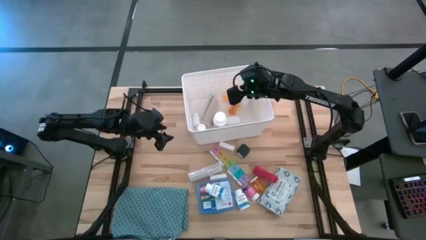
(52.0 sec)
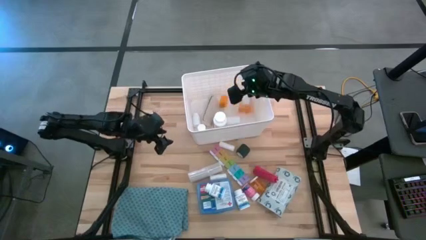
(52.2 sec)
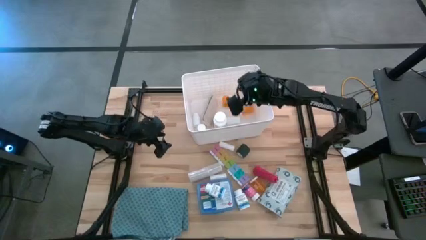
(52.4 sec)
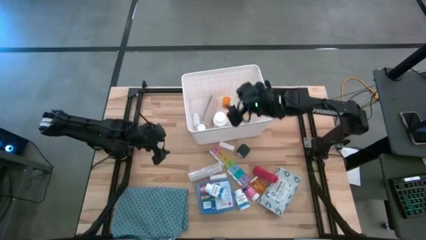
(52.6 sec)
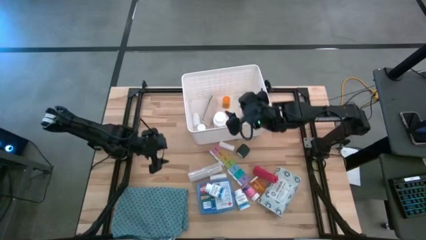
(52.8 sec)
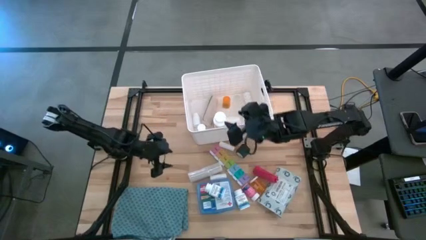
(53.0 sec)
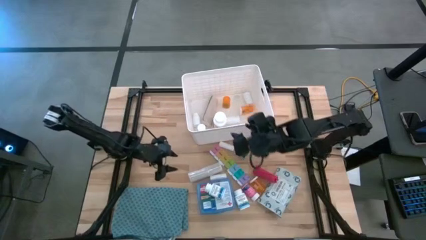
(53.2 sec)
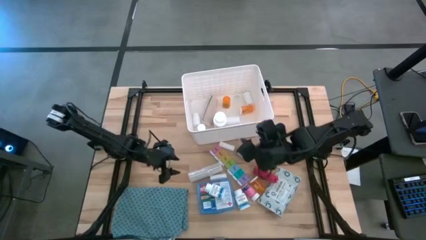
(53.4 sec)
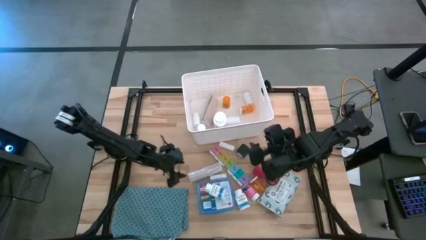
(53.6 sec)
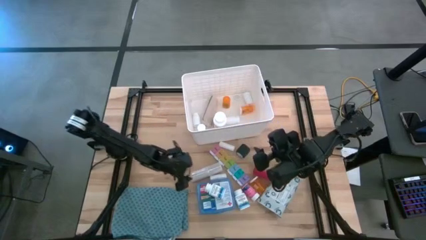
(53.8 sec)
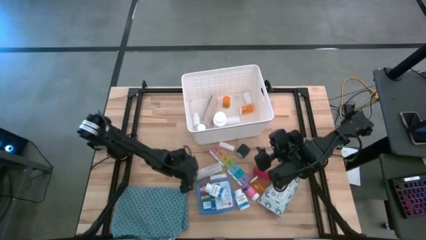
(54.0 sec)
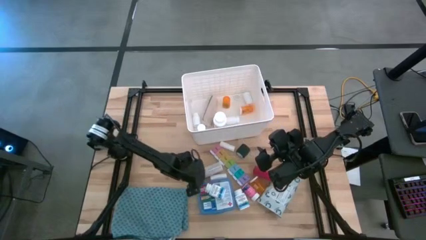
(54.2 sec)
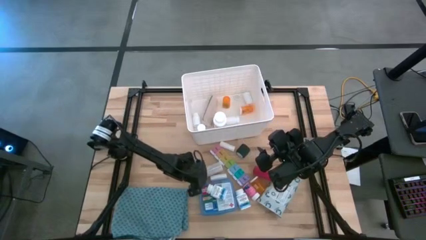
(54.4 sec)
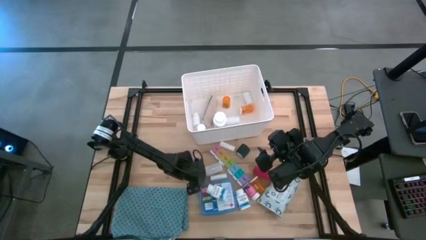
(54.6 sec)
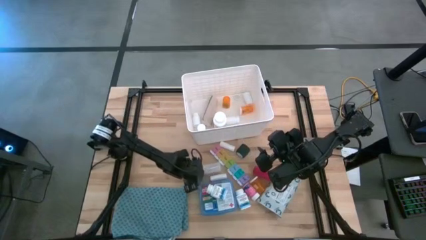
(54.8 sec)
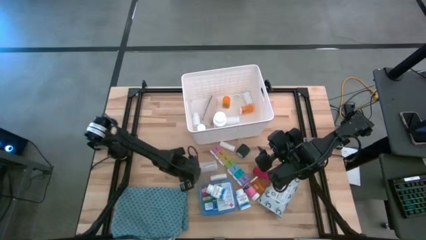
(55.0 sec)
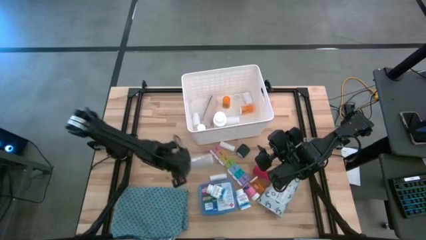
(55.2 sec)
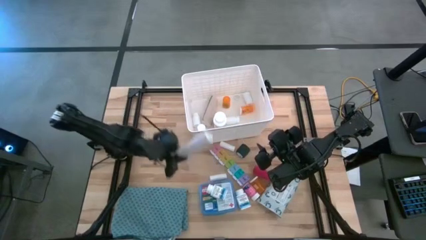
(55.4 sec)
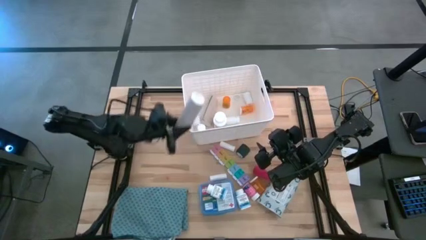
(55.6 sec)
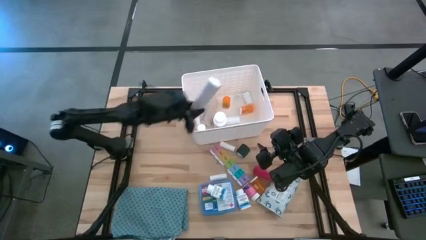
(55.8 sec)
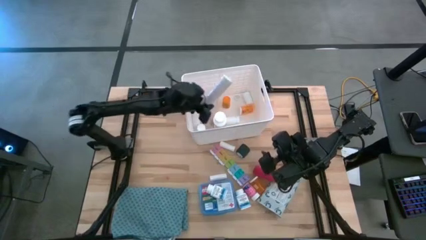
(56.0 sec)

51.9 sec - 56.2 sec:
Task: Pick & place medical supplies in basket/bin
Put the white bandage into the bin

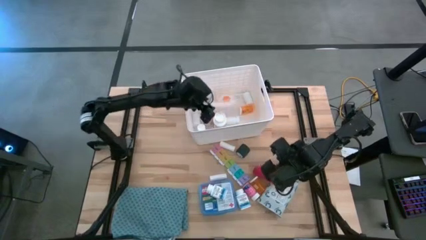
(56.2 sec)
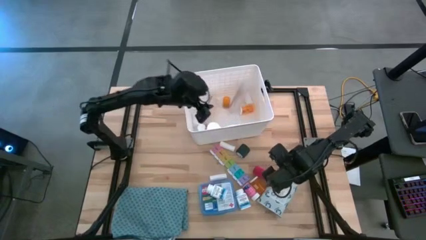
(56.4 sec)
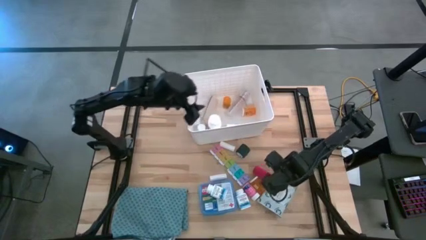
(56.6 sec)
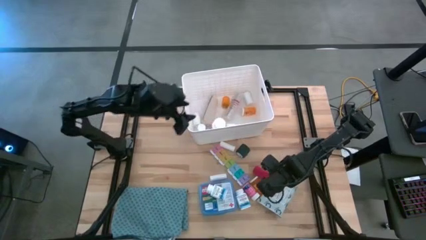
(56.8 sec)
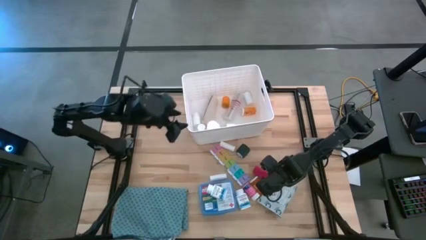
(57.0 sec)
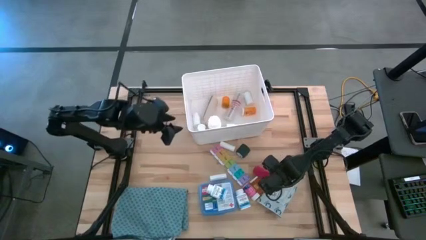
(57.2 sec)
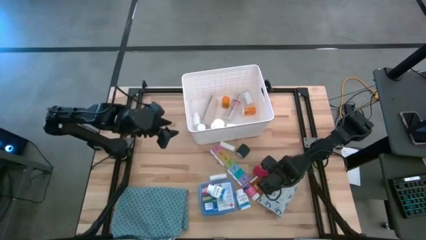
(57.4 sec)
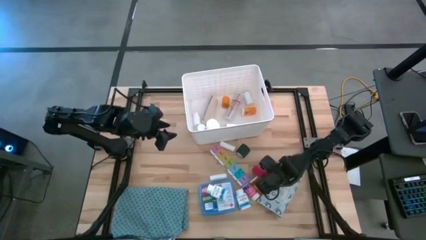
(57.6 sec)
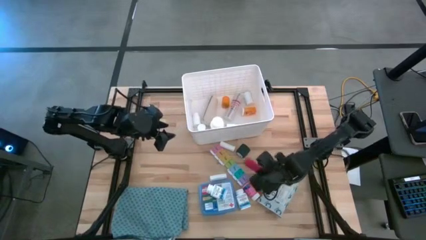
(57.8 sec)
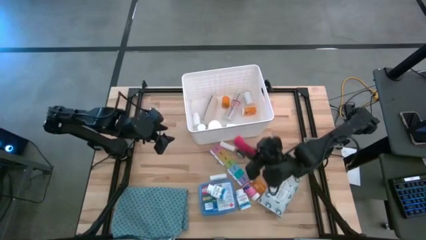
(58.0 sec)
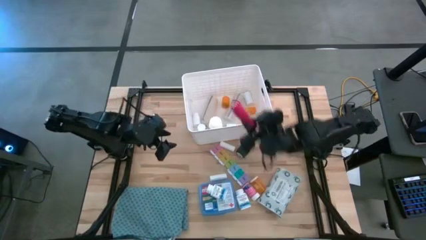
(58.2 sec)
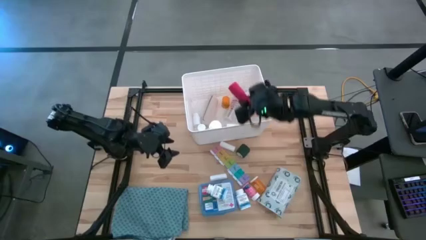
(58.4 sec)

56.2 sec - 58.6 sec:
Put the red bandage into the bin

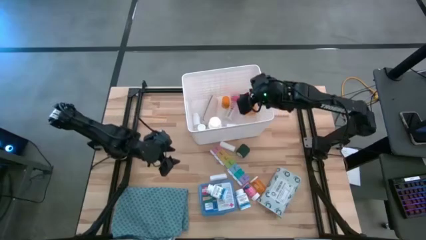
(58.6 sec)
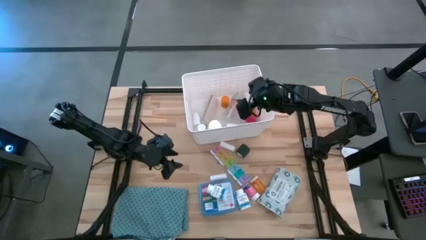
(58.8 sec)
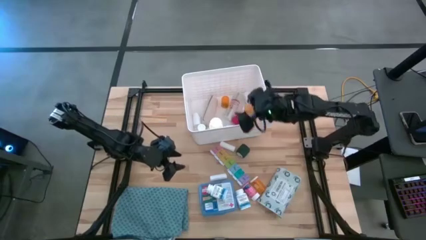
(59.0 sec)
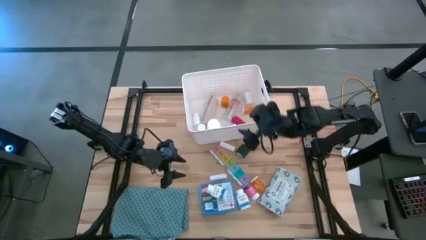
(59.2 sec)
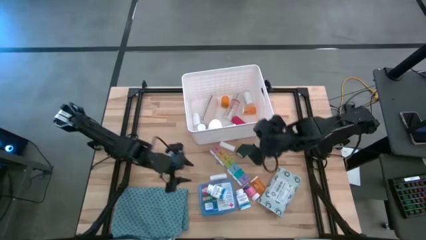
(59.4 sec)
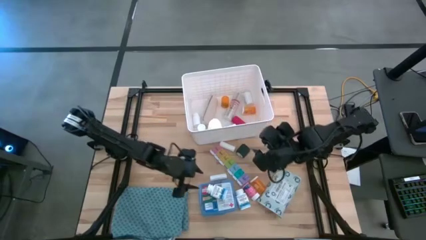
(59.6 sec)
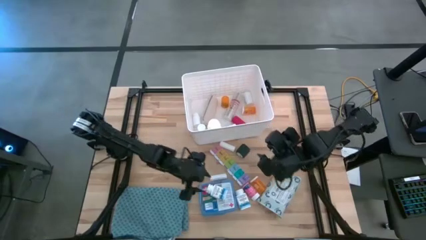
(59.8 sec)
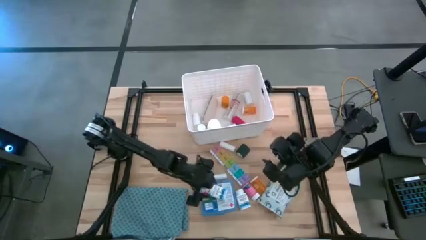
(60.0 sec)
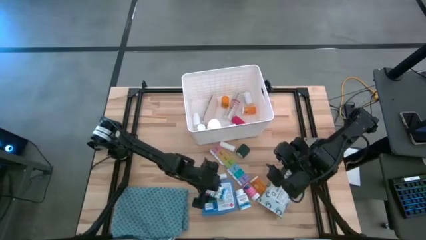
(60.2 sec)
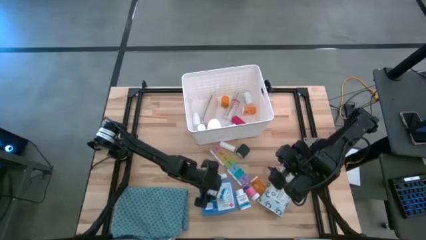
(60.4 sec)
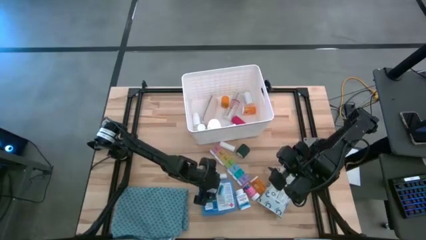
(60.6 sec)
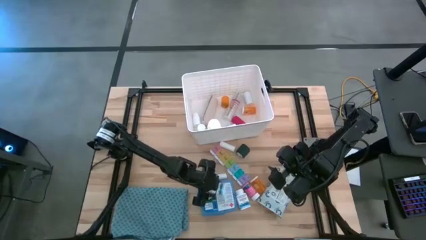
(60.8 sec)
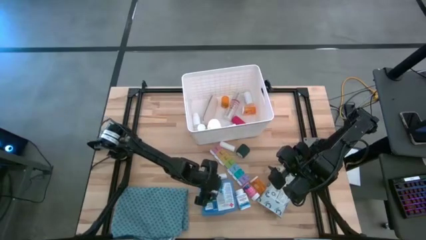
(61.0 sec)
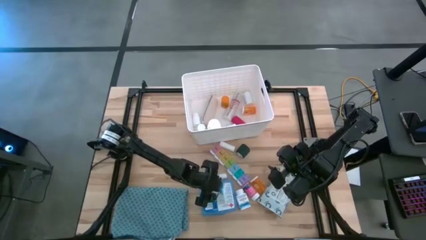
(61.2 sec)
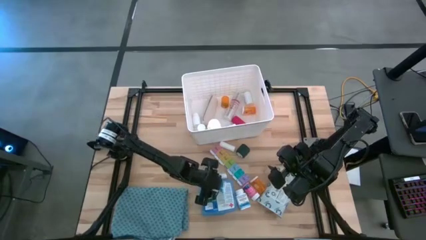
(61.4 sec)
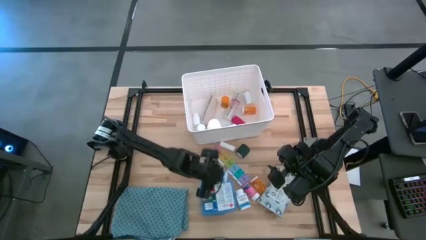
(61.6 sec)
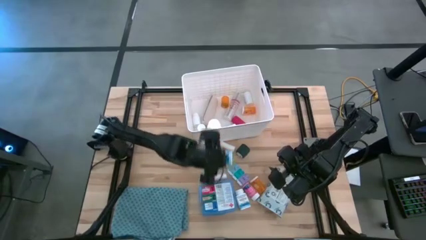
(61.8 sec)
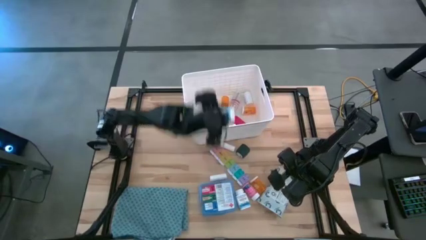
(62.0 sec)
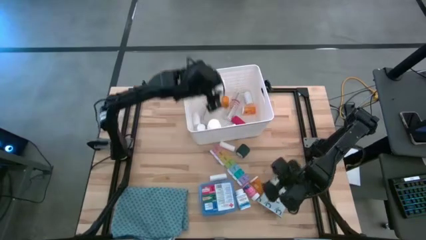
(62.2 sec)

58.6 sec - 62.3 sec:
Put the white and blue medicine bottle into the bin

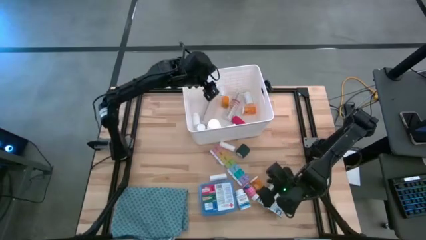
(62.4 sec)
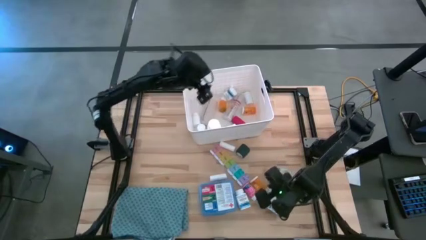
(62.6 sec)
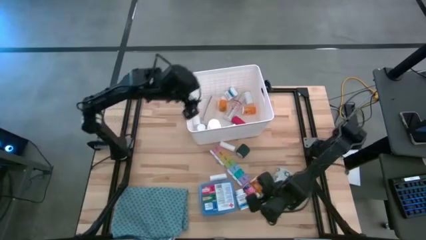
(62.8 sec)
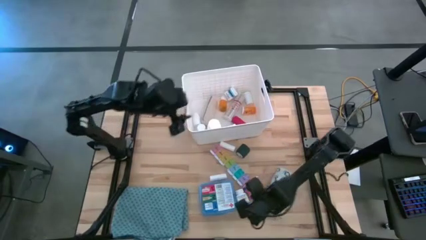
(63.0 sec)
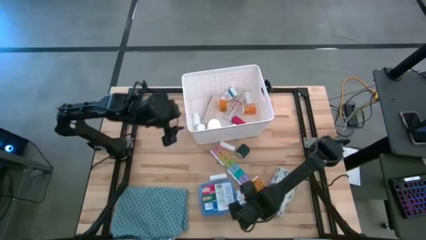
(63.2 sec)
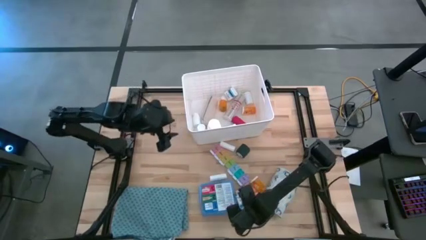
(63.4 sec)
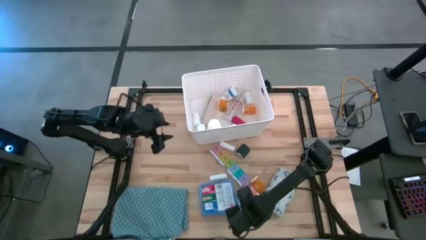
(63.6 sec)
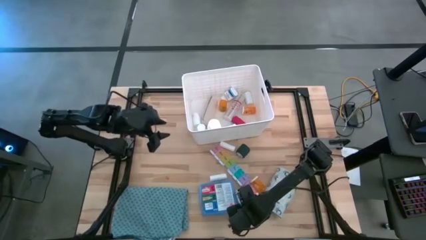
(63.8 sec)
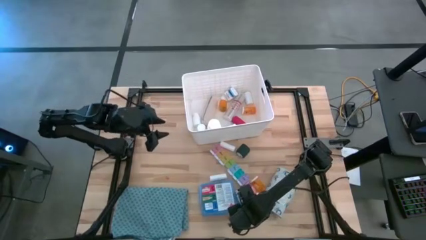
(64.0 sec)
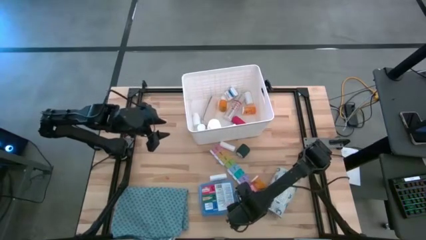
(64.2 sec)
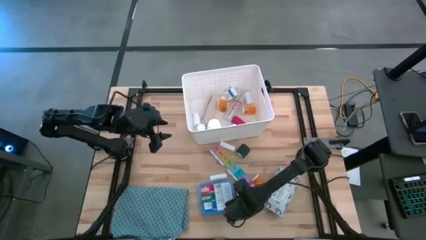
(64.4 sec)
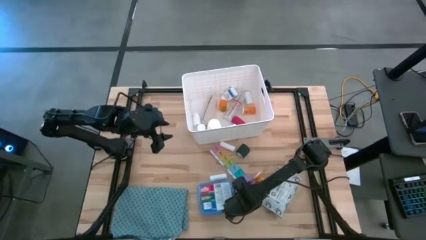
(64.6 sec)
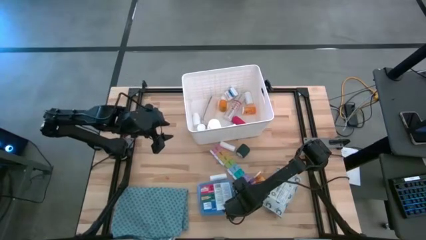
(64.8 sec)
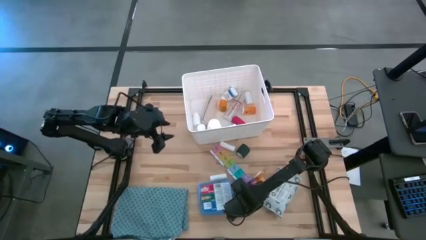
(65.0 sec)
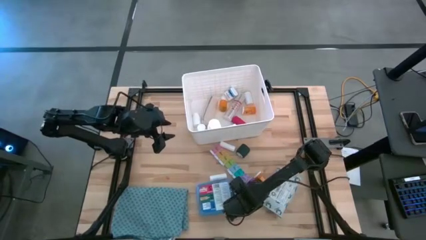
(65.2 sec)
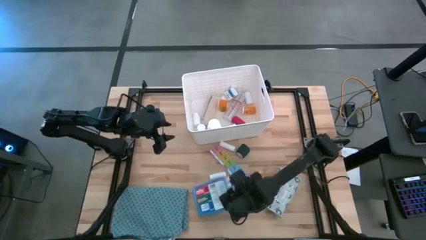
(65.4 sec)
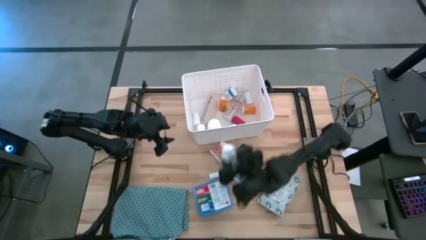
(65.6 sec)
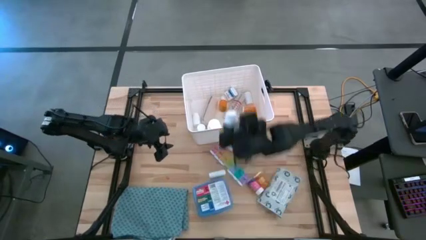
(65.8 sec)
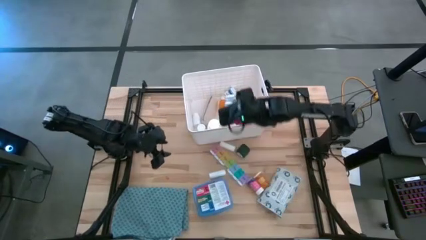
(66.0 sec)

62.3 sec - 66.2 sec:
Put the white and blue medicine bottle into the bin

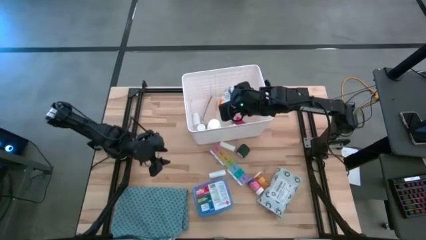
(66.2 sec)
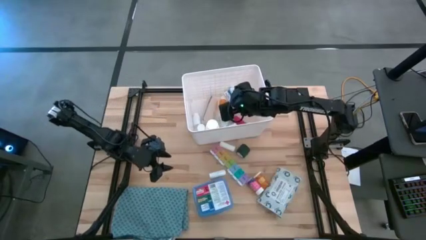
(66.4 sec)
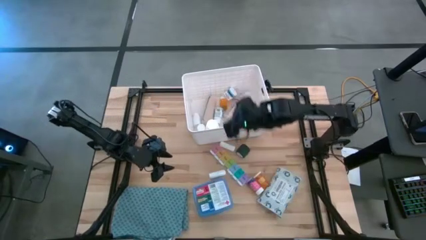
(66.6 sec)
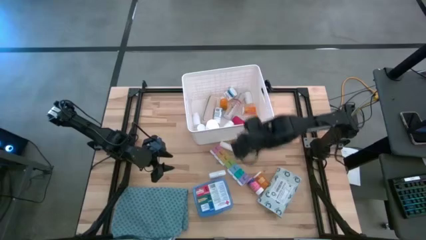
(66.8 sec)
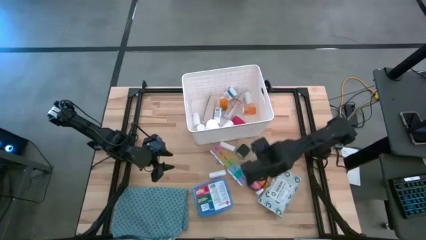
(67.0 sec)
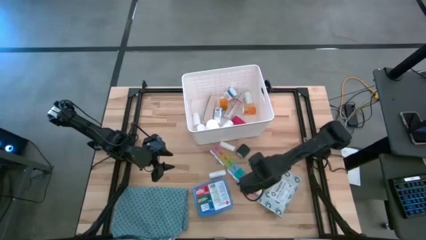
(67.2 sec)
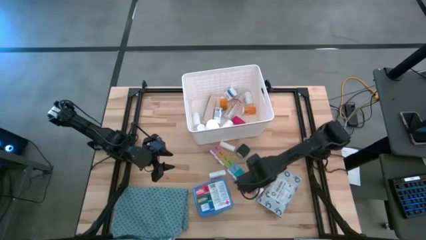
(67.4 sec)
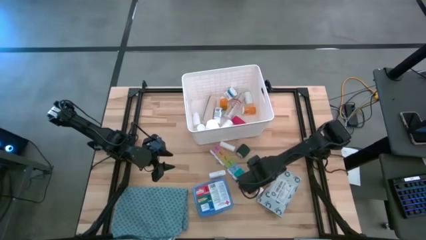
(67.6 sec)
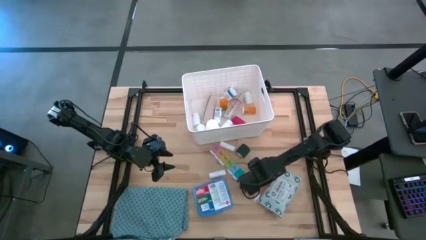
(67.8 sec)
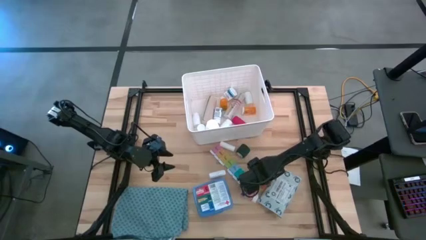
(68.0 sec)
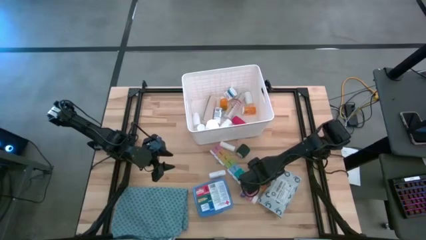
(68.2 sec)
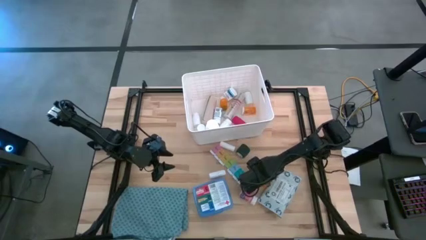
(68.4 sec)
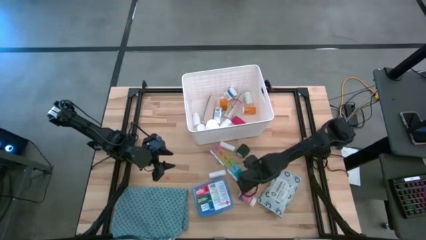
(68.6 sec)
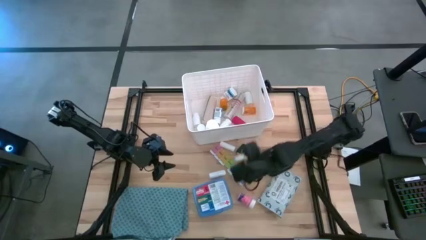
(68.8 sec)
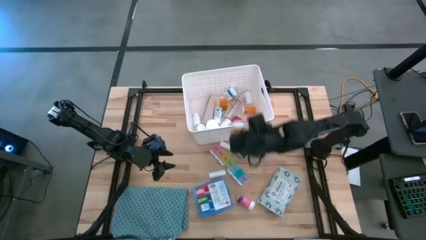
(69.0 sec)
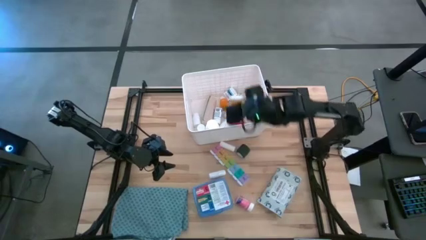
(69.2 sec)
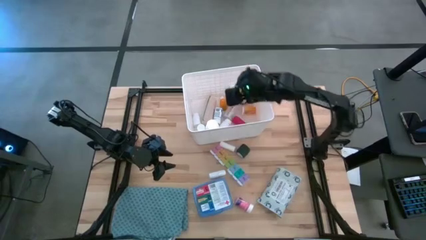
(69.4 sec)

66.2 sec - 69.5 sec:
Put the orange medicine bottle into the bin
